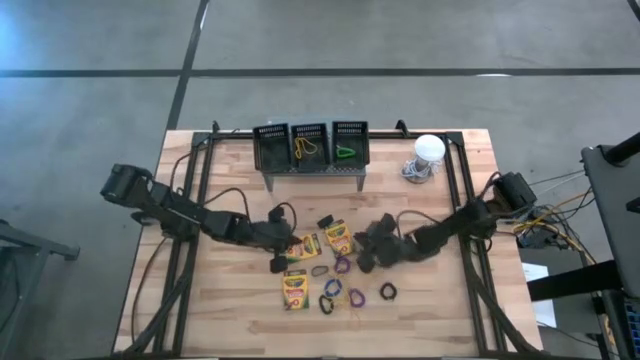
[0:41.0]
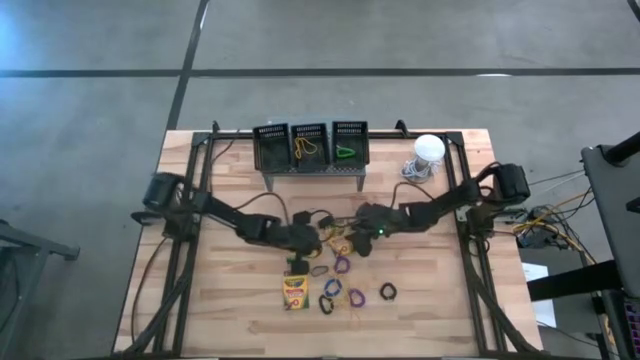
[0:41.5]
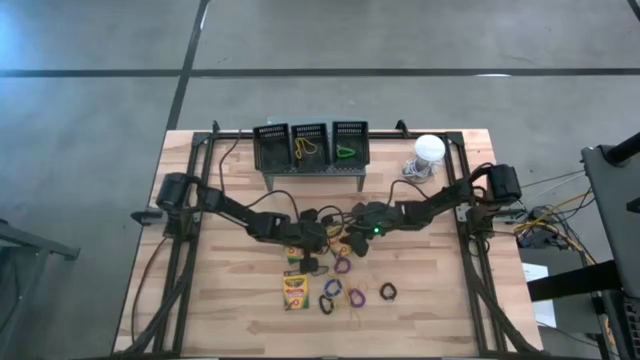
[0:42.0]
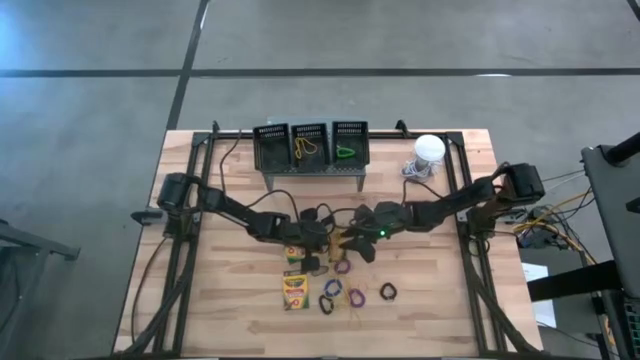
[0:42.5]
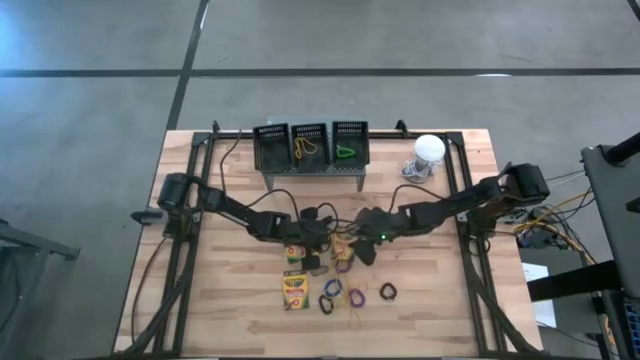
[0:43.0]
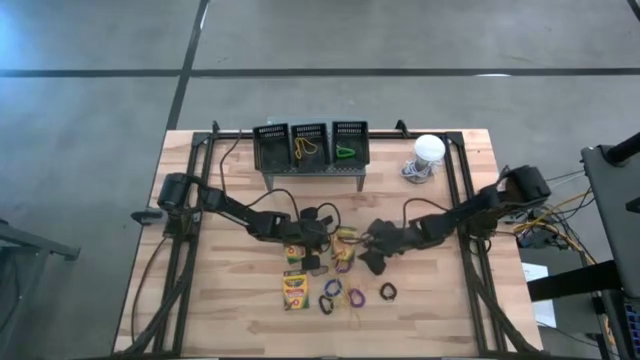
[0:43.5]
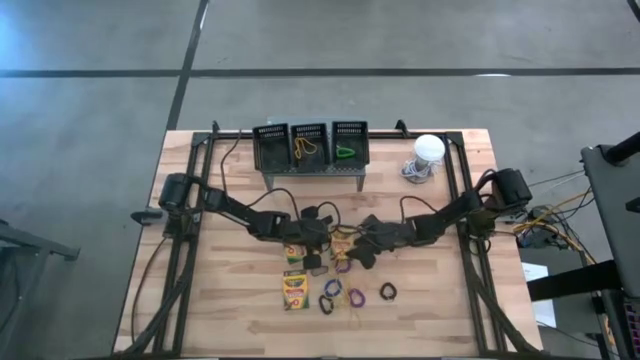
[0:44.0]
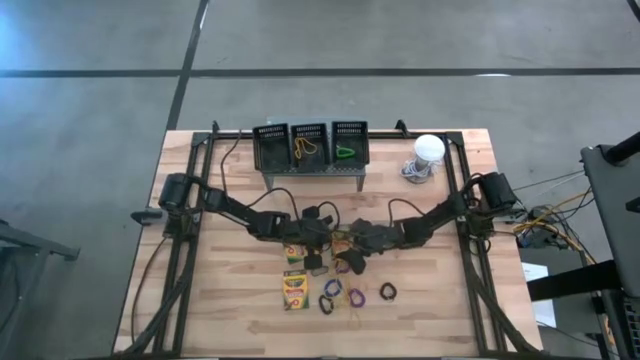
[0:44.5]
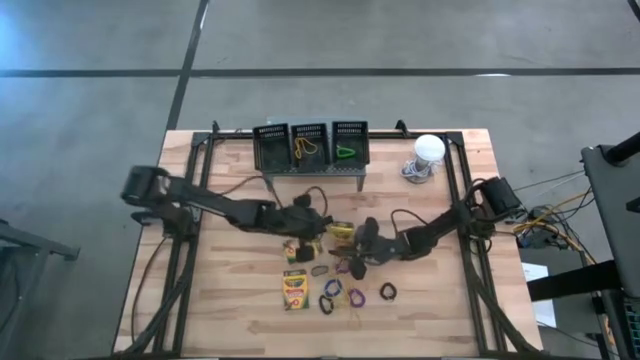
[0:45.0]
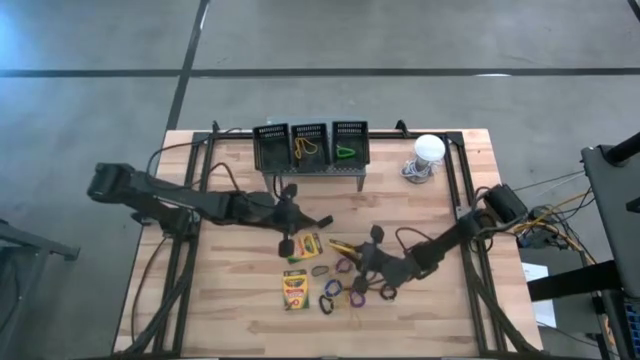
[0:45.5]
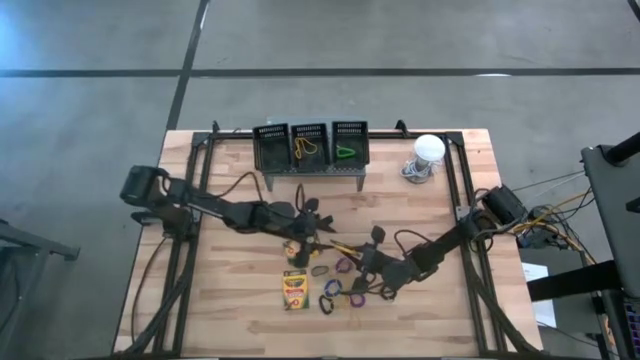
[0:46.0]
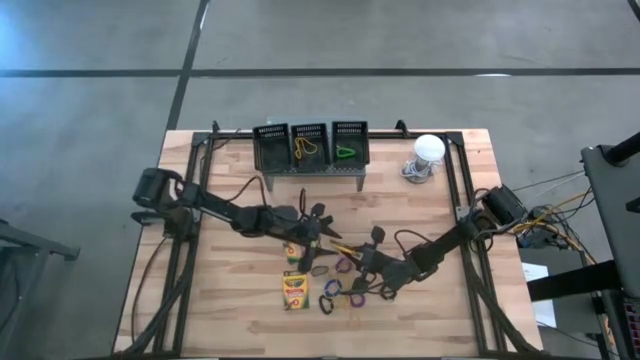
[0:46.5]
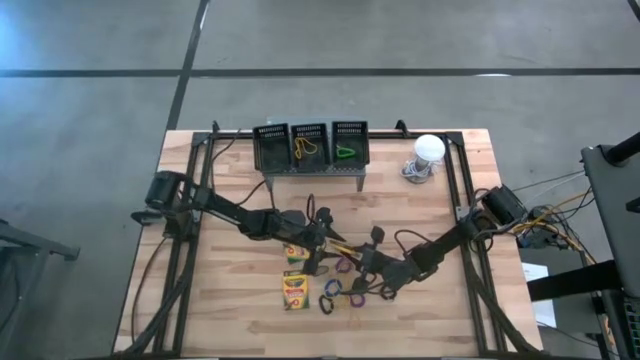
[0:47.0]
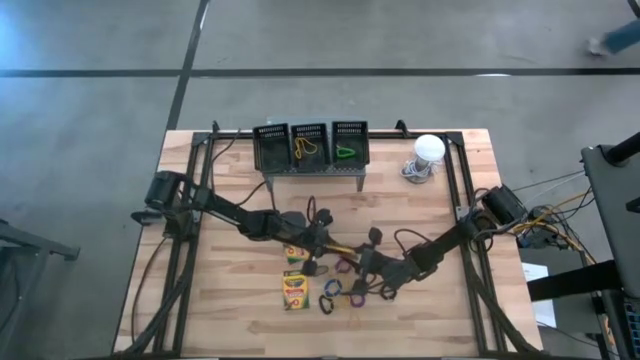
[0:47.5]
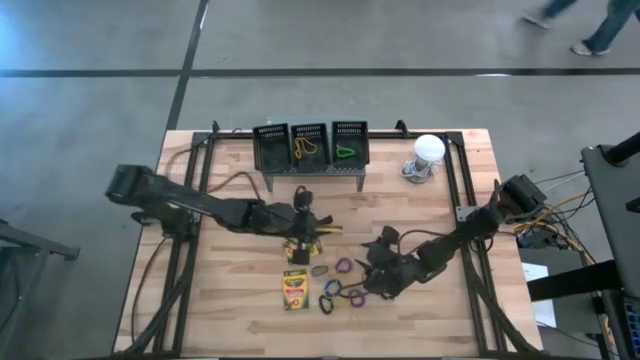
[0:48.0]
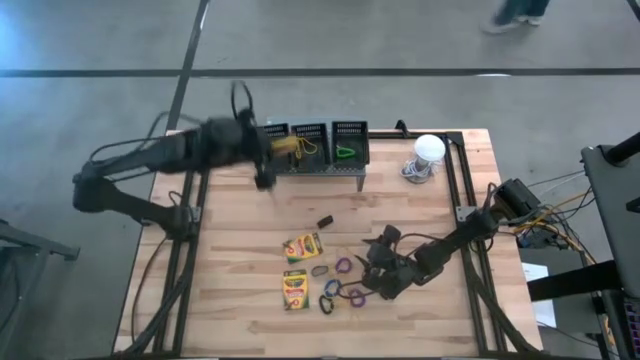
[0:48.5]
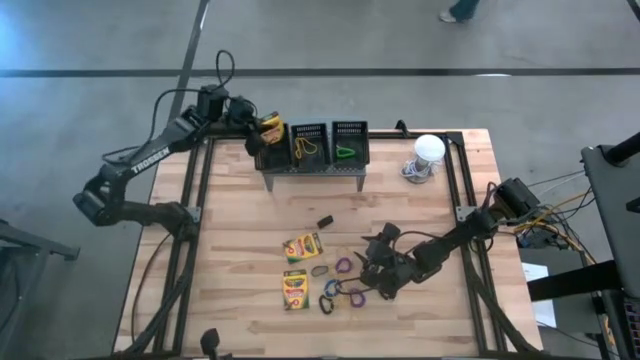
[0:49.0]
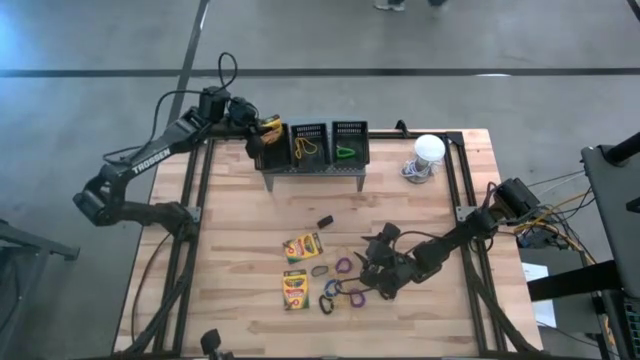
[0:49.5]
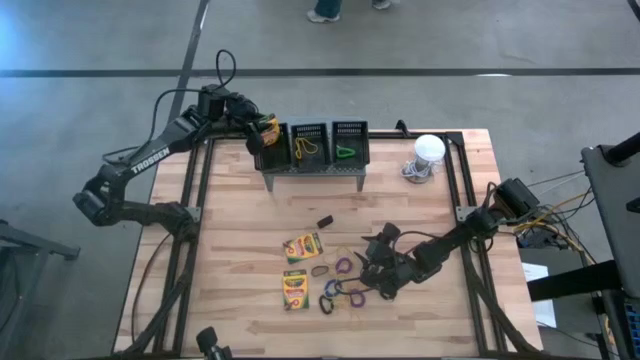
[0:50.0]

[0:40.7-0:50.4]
Task: Pick & Place Office Desk Supplies
Put the top left crayon box of into the left black bin

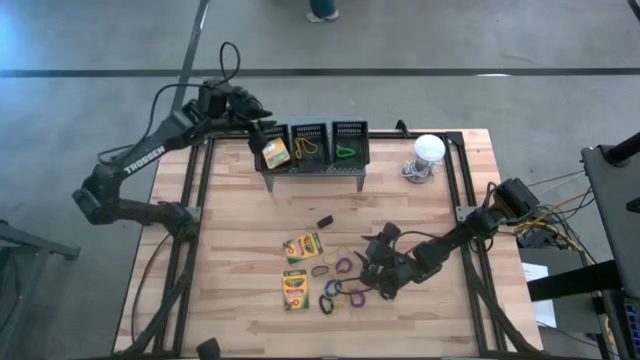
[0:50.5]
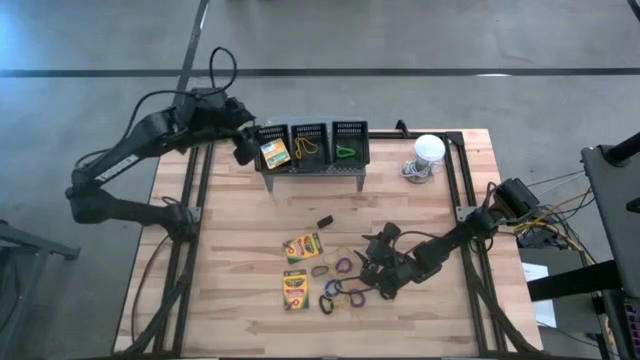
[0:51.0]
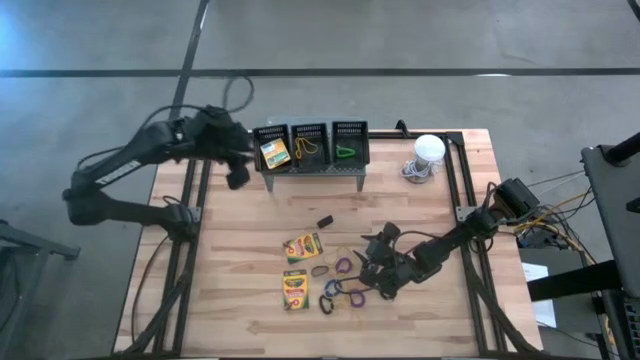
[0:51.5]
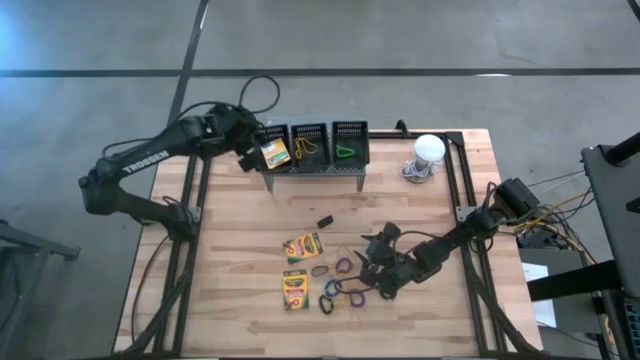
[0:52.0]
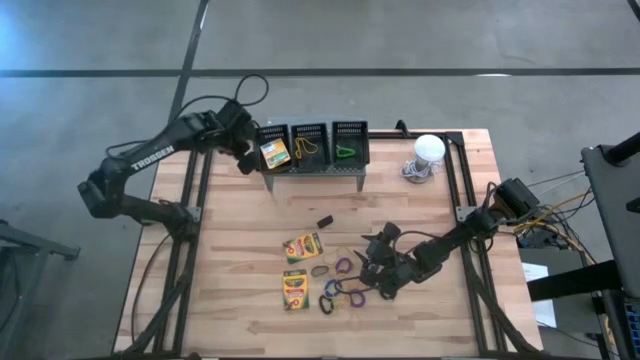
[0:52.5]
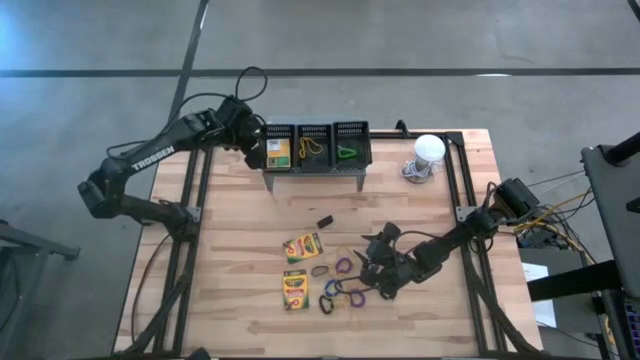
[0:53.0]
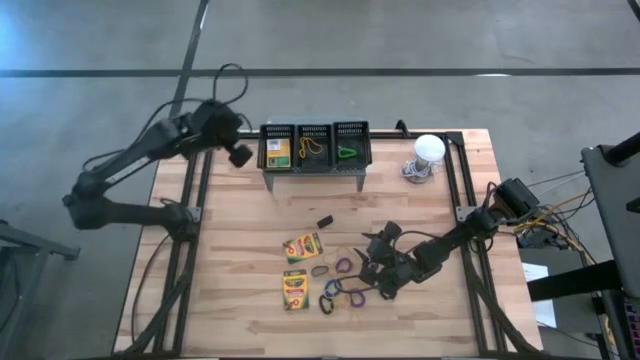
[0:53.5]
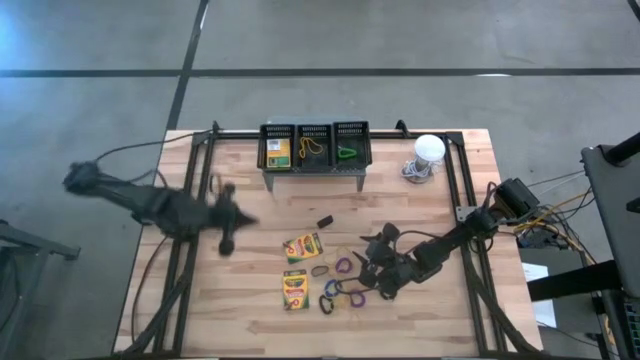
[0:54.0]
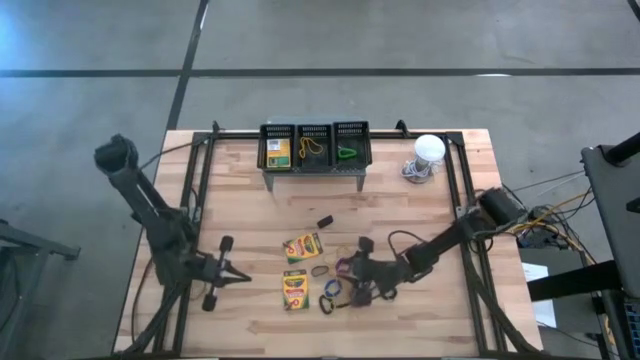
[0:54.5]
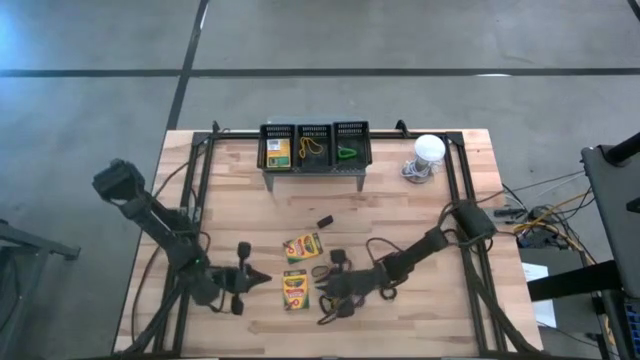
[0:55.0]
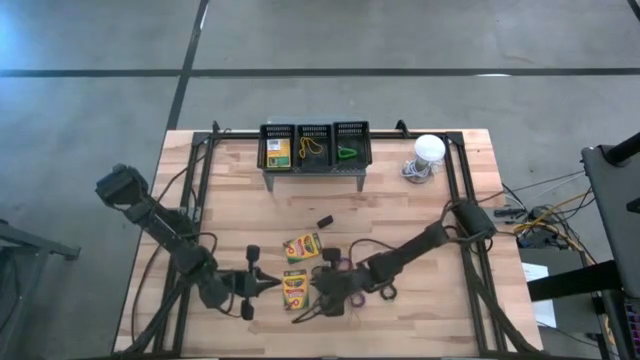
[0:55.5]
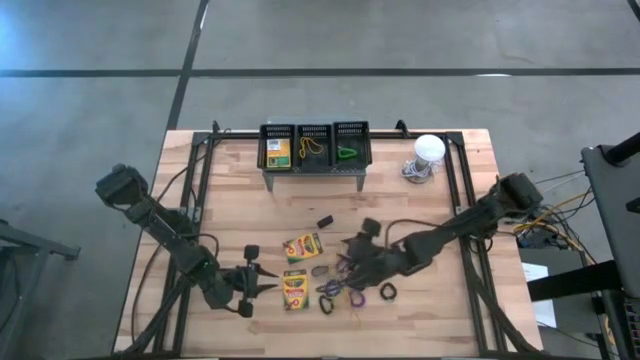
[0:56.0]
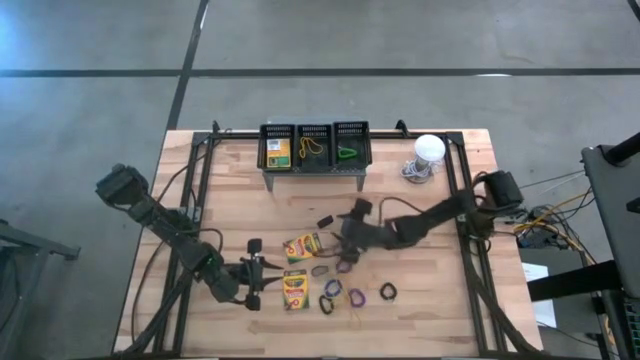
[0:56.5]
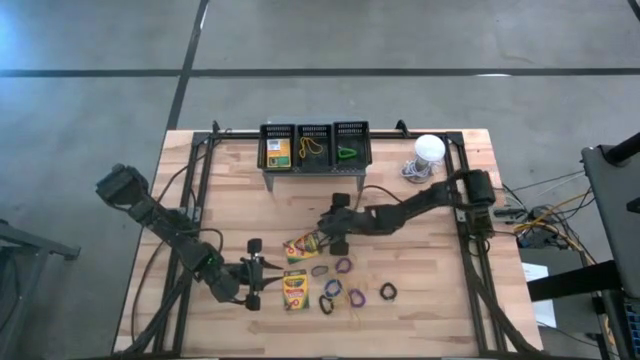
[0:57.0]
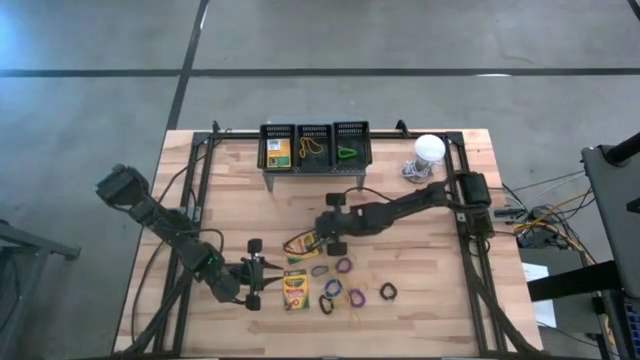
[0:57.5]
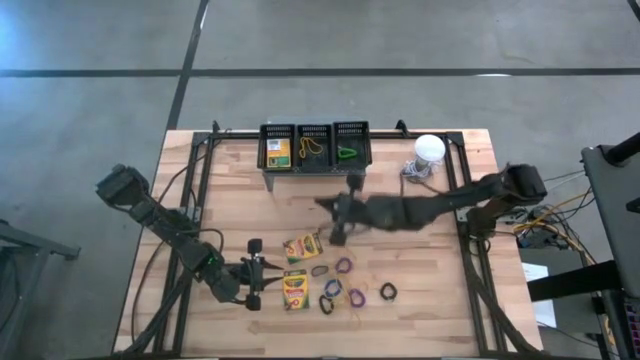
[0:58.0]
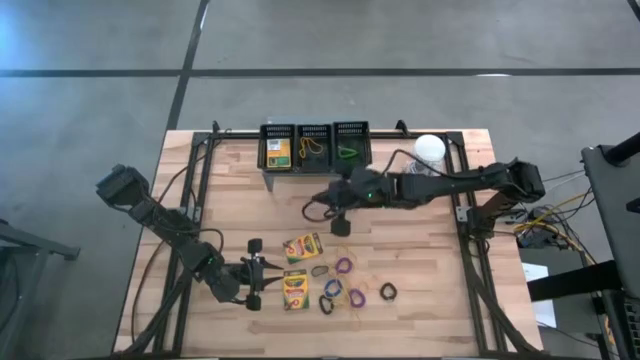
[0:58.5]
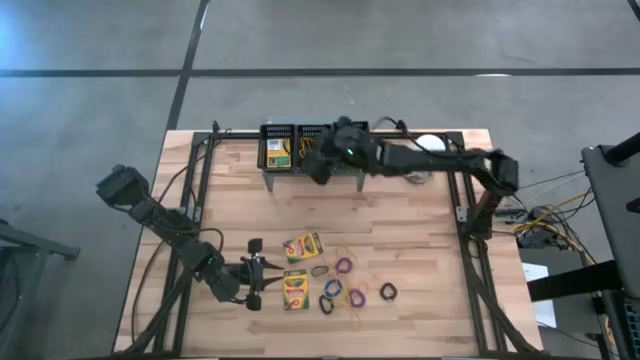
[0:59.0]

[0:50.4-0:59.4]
Put the black rubber band into the middle black bin

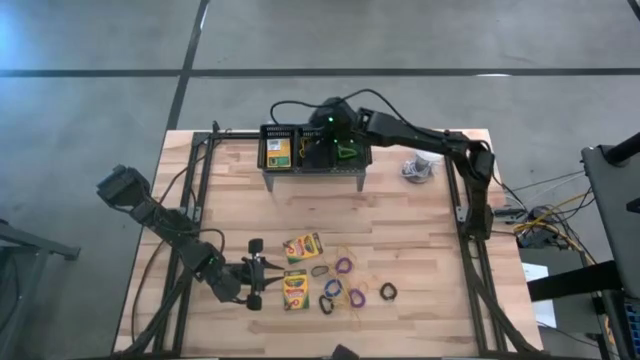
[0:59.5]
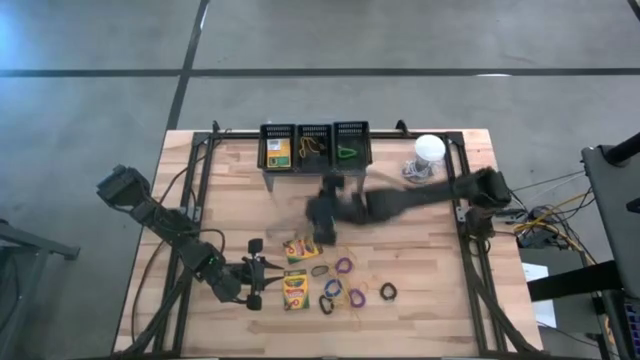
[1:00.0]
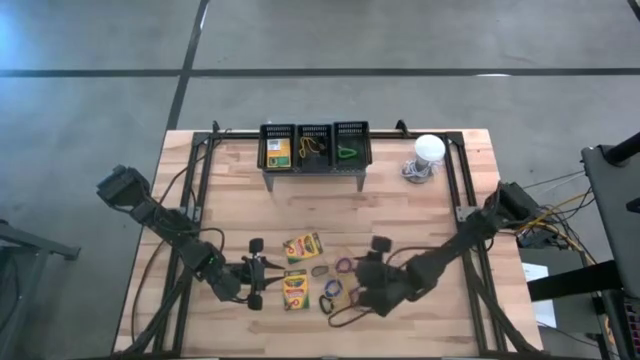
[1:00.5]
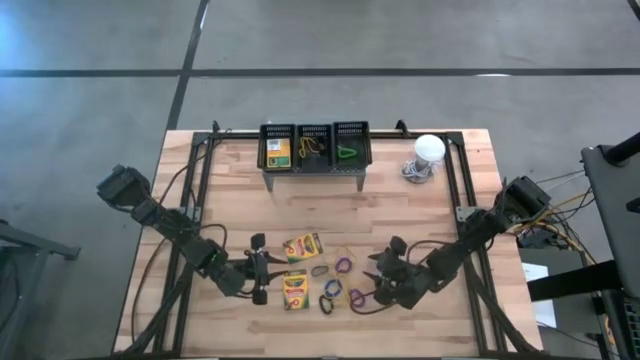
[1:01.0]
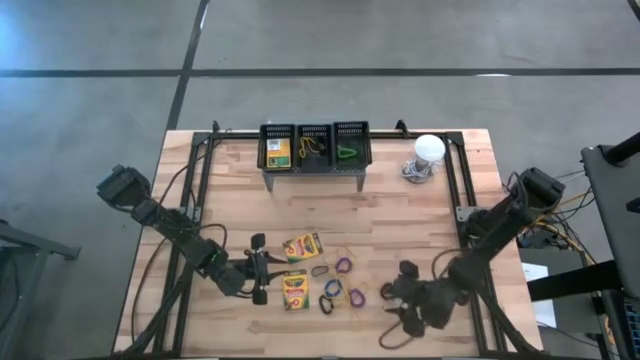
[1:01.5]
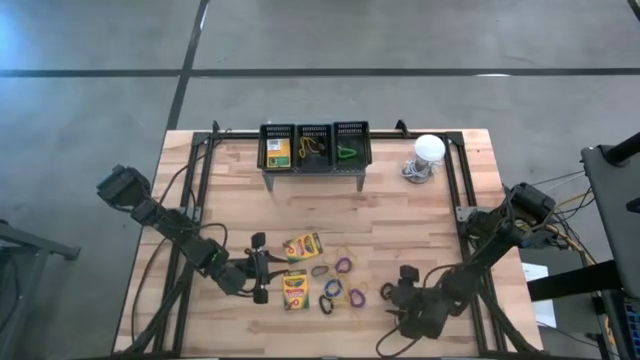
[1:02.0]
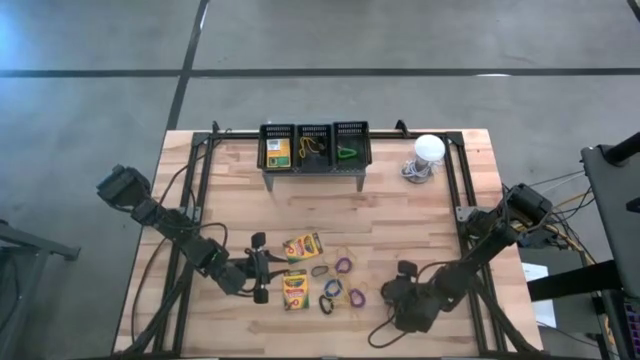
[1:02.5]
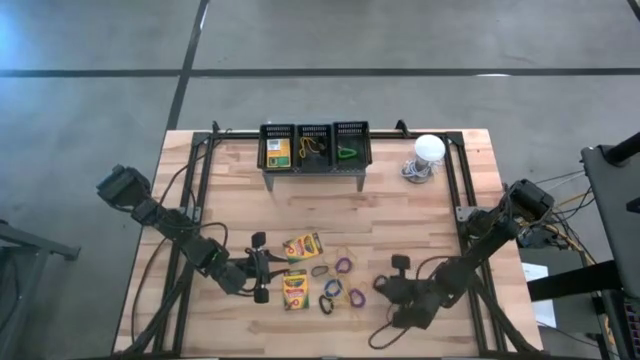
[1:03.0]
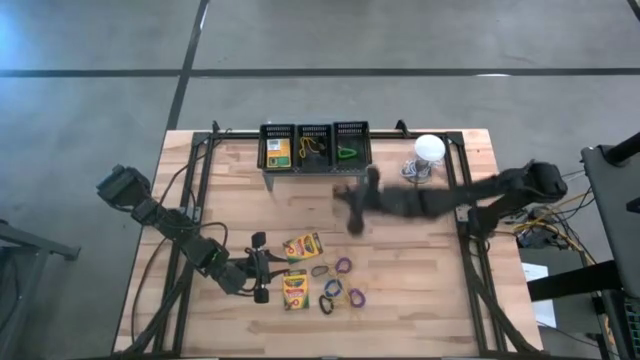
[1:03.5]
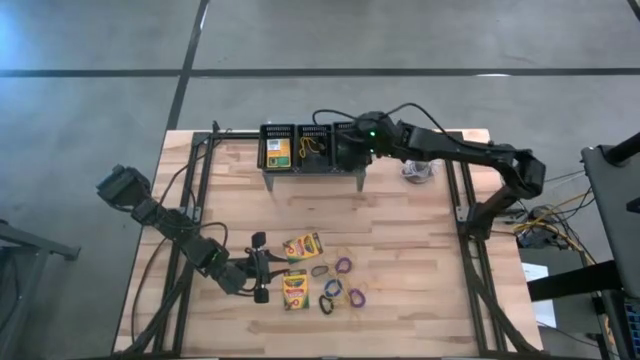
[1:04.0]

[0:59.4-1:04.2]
Put the black spring key chain into the right black bin
